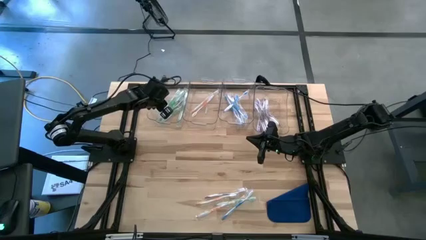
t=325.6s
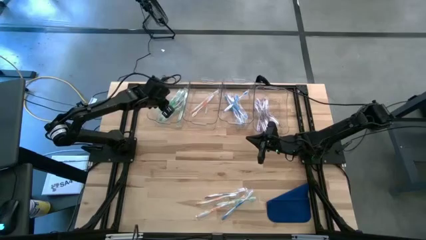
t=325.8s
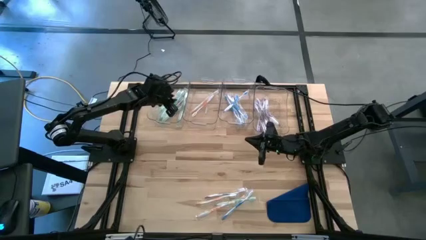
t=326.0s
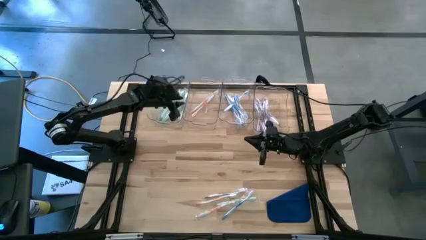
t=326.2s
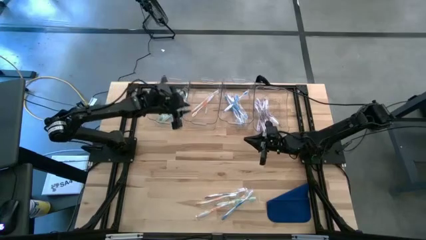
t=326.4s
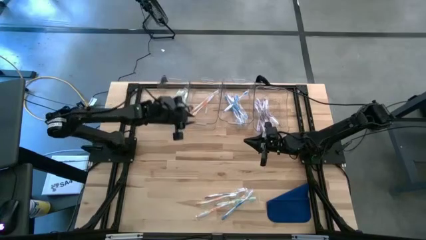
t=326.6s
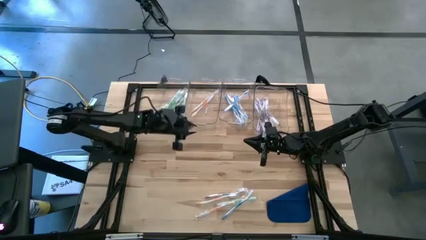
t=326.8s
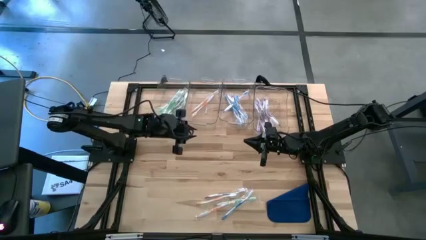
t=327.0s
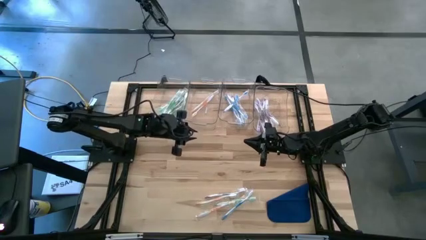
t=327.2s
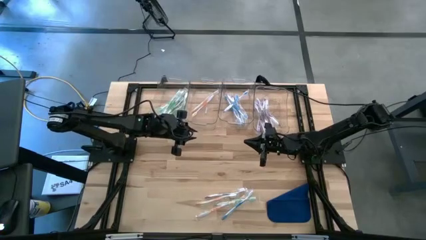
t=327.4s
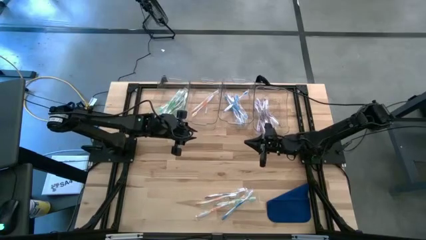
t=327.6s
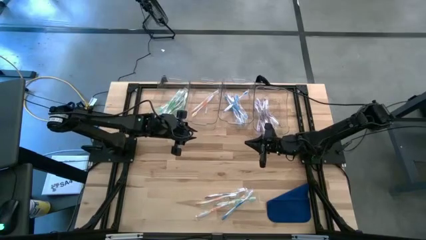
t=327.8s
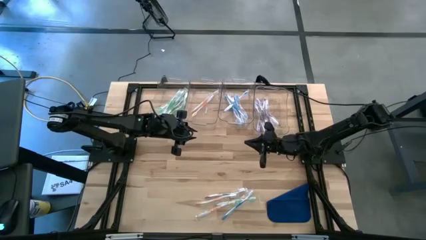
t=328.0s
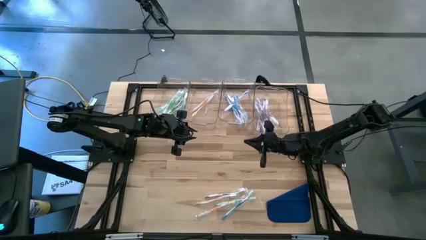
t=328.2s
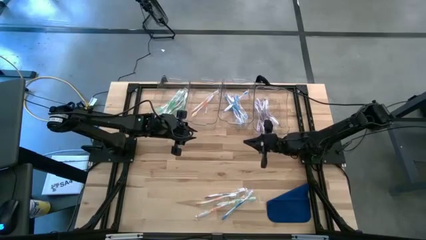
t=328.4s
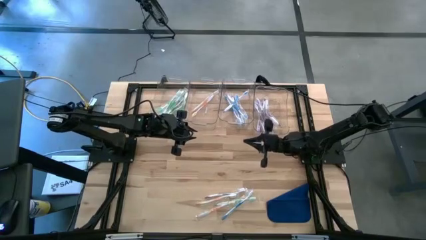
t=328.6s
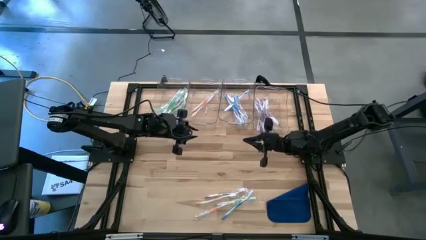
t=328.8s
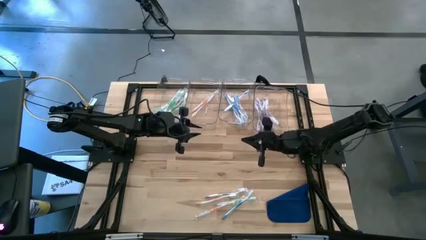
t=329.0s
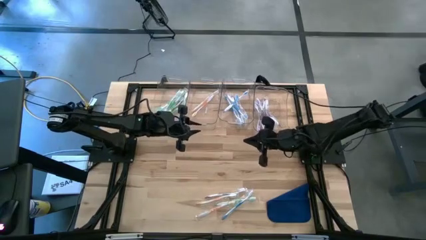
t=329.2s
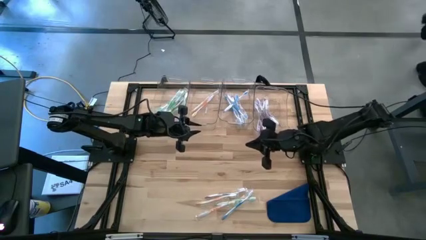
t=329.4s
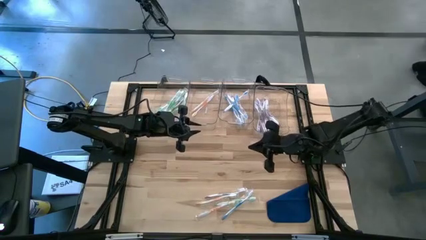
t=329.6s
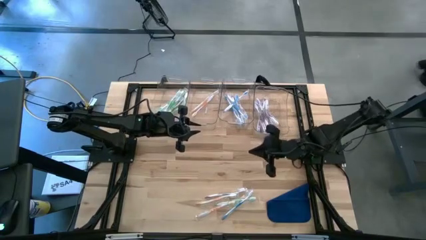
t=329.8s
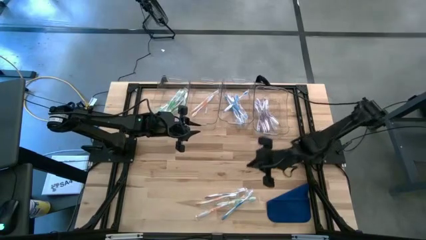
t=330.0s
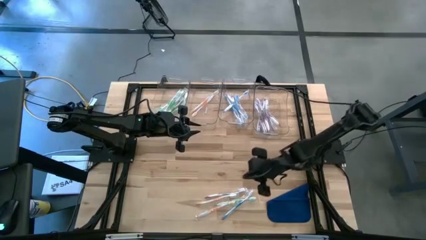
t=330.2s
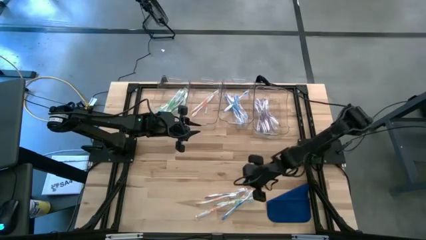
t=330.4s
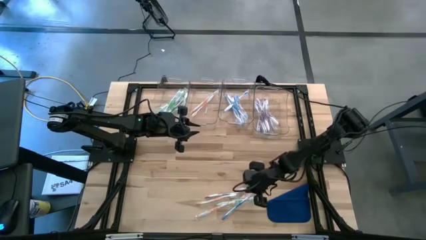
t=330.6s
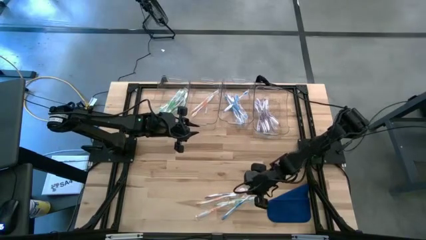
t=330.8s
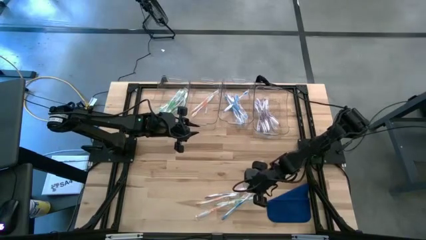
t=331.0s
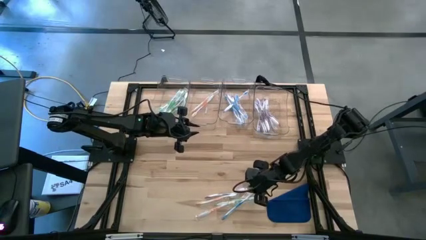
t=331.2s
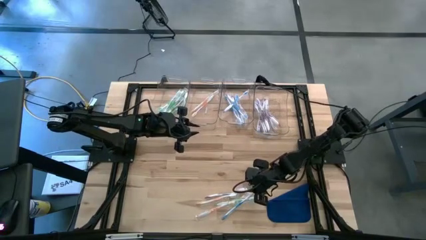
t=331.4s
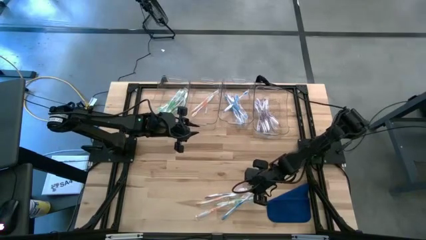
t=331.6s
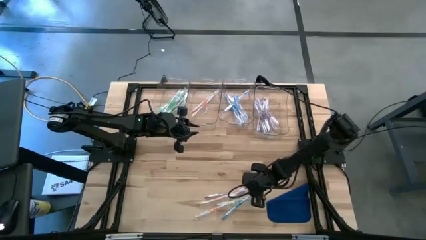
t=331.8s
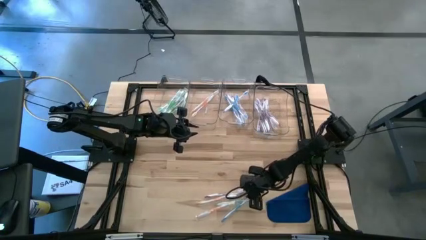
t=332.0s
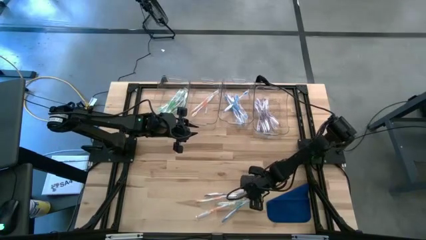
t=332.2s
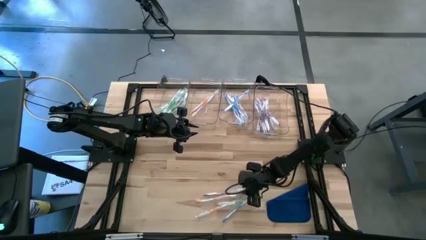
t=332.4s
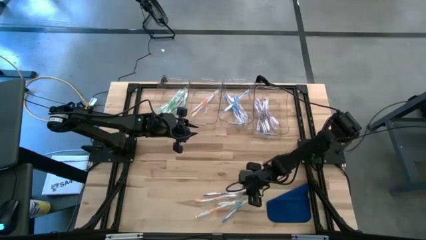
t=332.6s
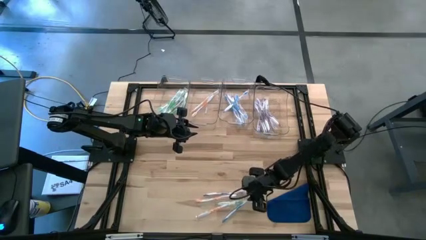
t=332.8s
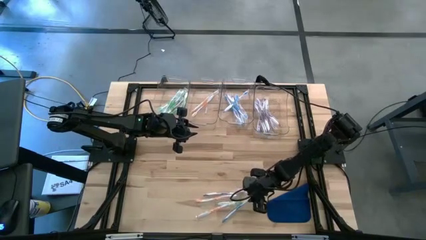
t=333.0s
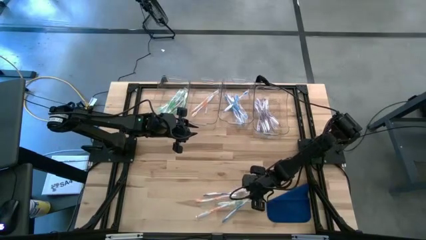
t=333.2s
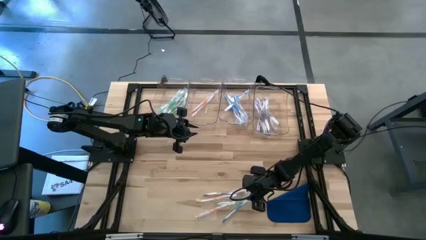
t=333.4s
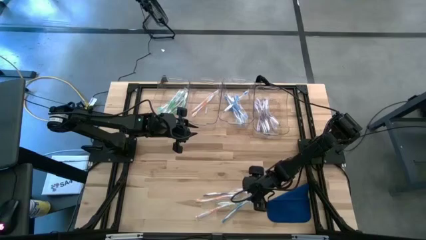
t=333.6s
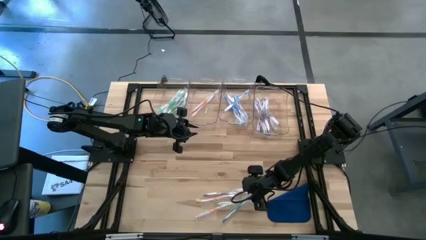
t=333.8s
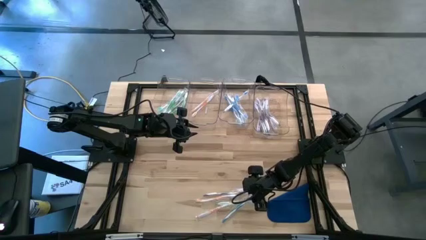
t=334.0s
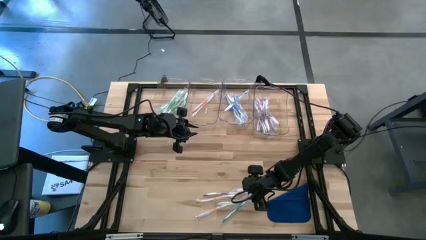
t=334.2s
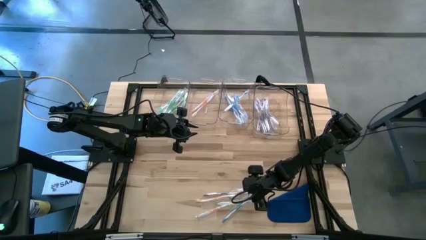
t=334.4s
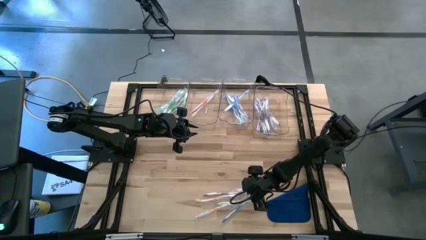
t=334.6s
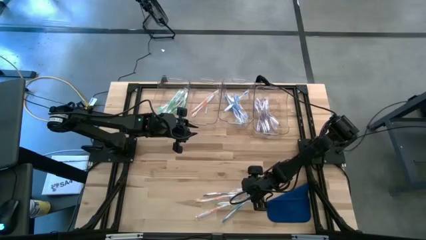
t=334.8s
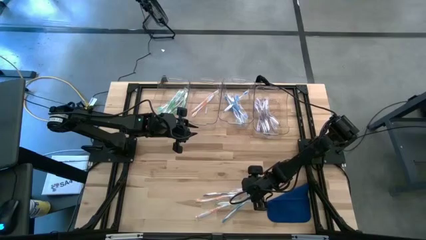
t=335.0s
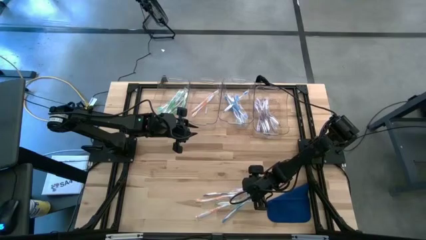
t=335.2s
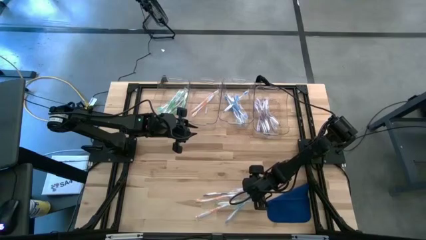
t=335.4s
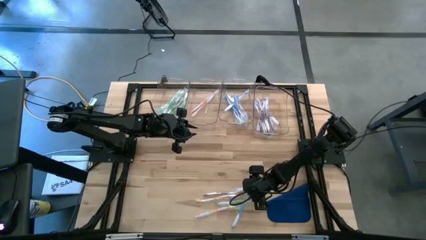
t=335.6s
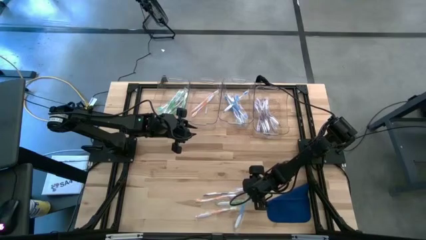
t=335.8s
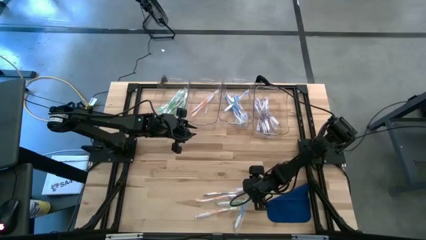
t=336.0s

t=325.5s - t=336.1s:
Task: Pick & Place Toothbrushes
Put the blue toothbrush into the middle right transparent bin

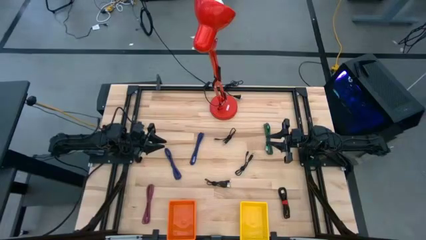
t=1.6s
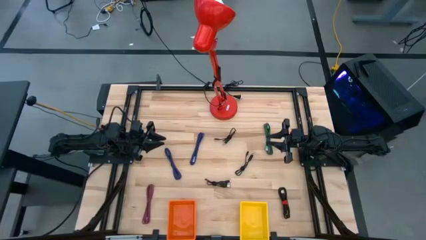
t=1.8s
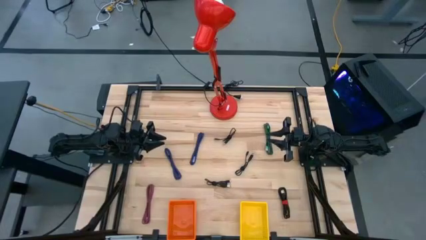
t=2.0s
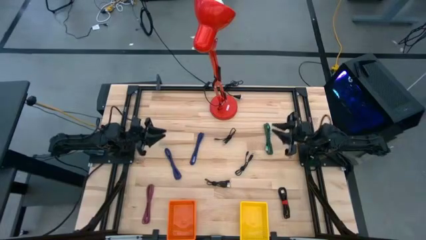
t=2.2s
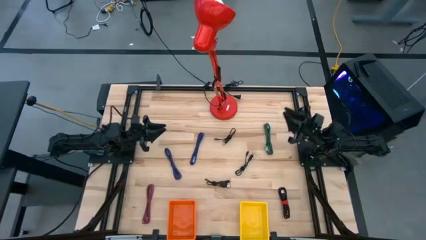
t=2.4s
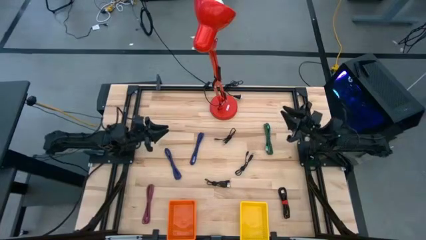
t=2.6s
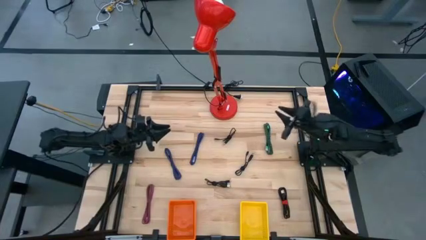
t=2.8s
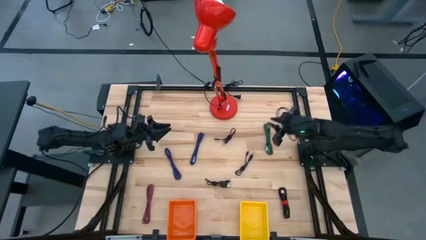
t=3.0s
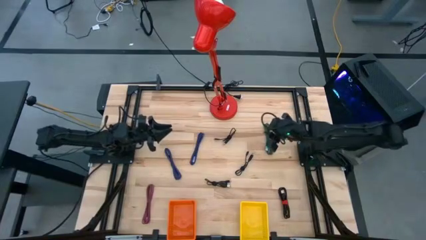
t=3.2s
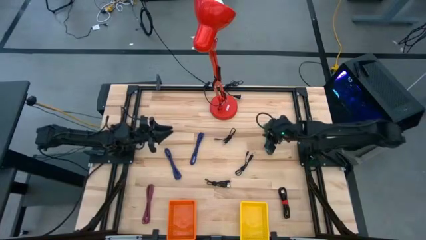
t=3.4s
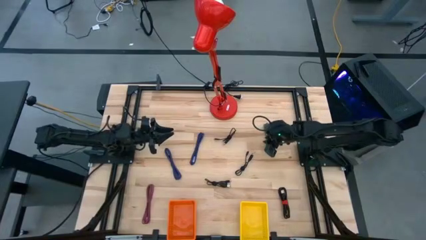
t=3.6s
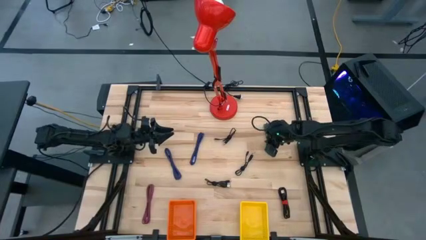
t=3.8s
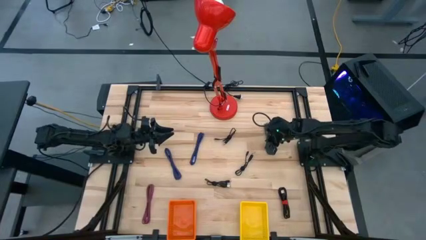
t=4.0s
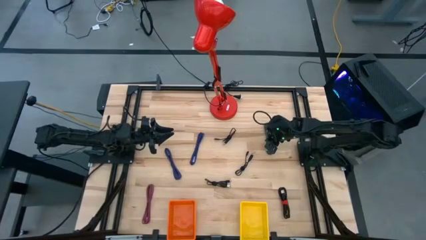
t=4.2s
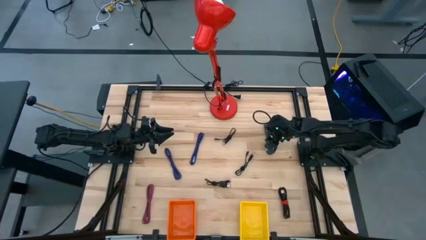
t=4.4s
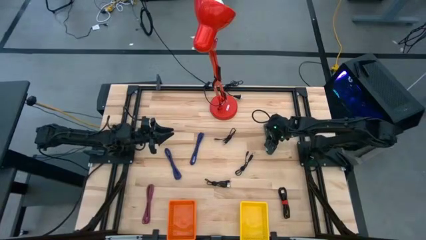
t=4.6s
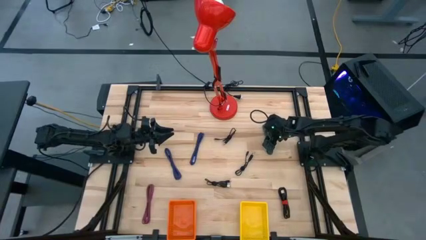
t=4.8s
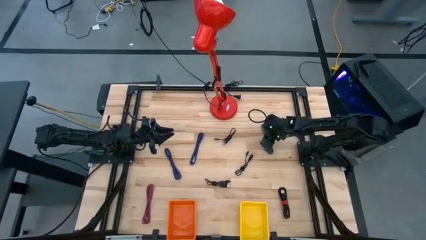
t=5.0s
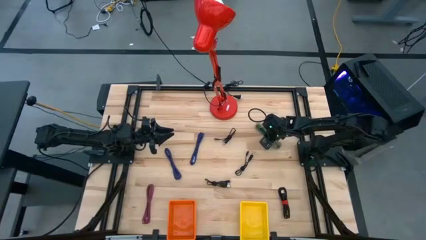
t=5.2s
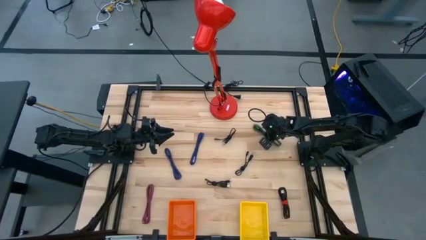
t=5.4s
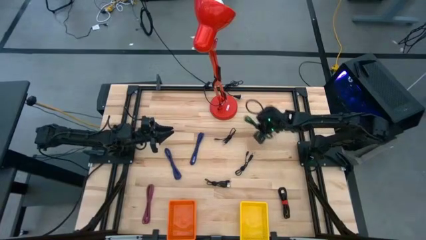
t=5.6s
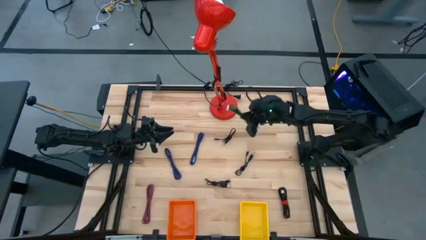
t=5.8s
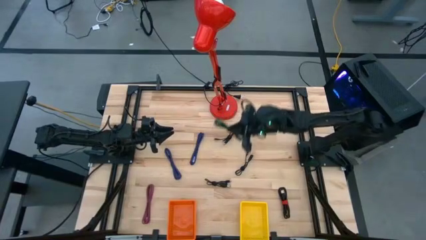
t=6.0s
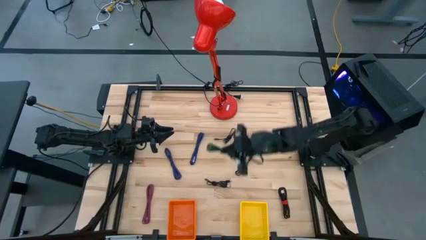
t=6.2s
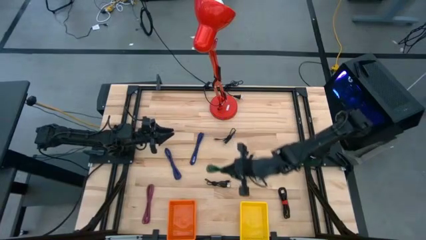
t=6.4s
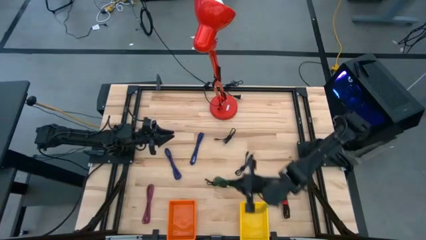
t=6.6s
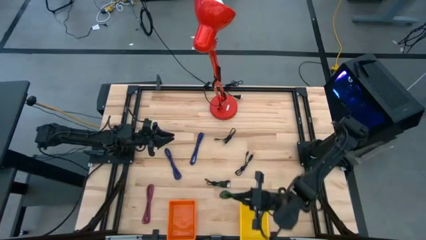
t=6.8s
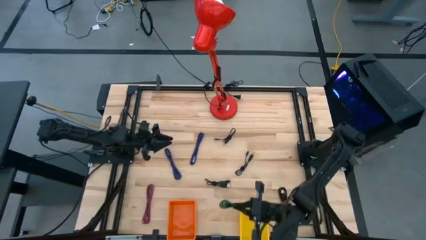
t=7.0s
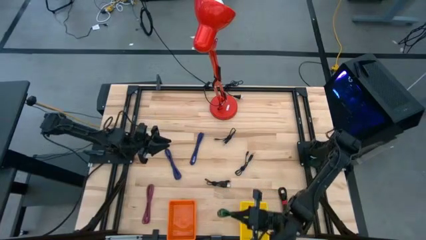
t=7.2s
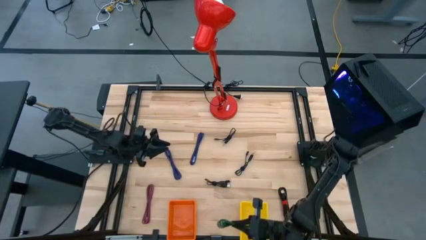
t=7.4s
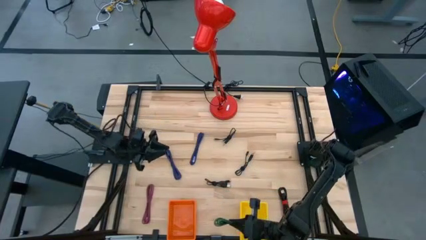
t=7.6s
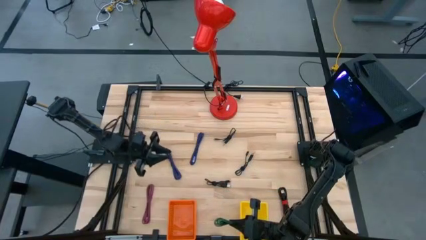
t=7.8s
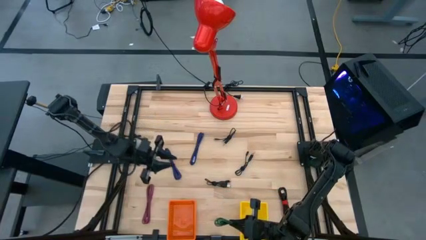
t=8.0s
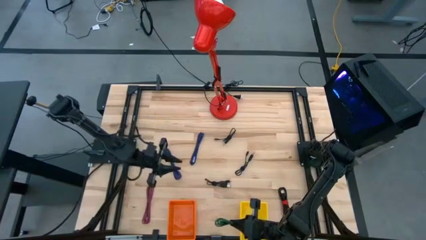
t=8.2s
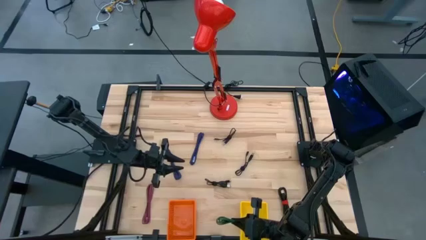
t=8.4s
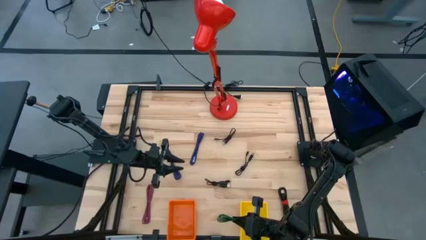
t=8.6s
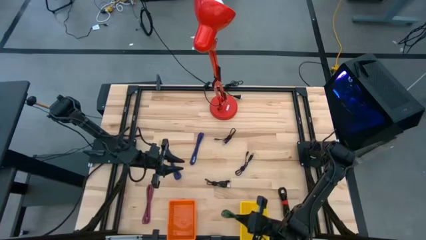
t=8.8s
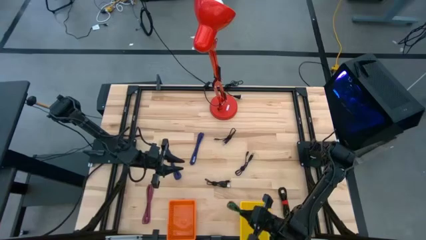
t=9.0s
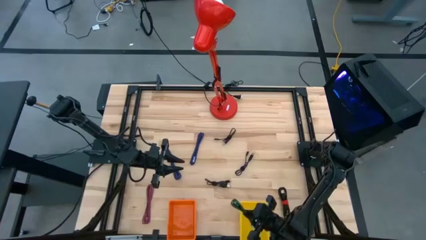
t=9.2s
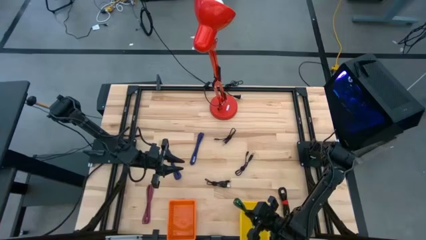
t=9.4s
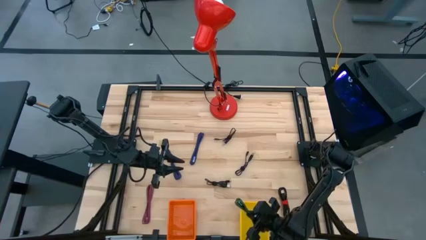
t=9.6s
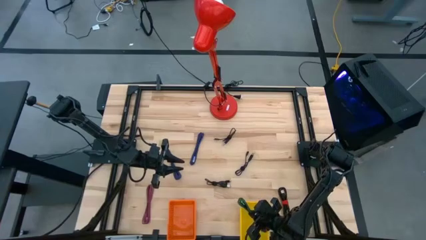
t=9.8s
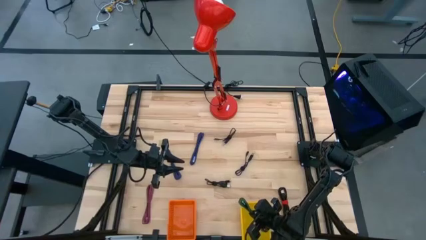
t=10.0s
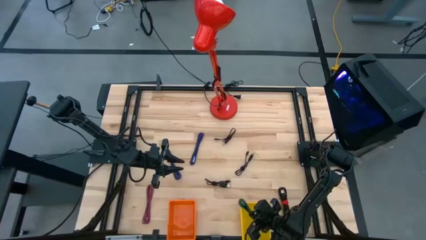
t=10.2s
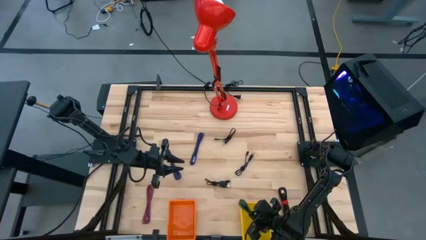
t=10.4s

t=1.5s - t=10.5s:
Task: Pick & Place USB Port
Put the green charger cable into the yellow bin
